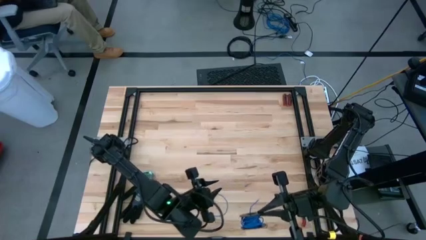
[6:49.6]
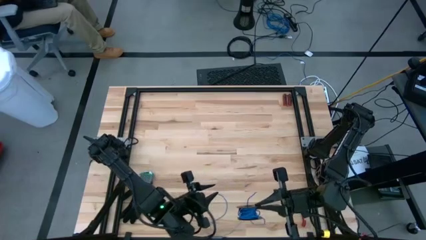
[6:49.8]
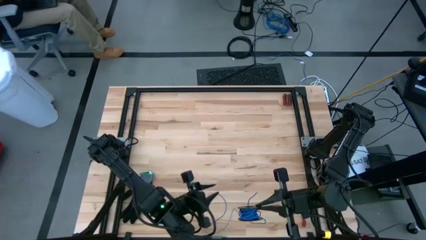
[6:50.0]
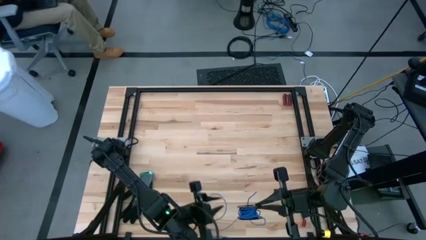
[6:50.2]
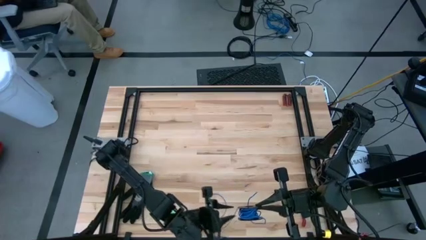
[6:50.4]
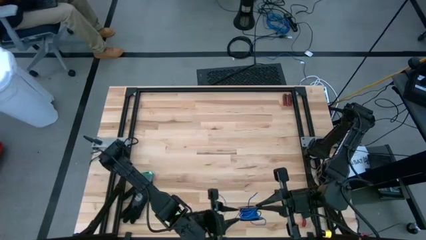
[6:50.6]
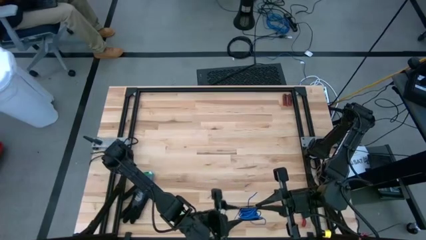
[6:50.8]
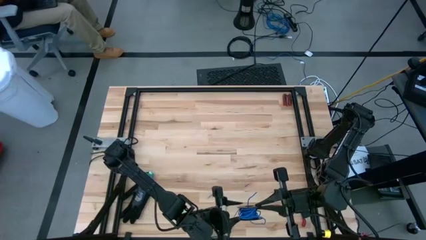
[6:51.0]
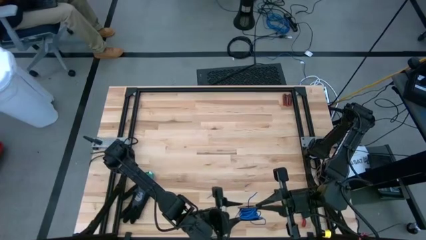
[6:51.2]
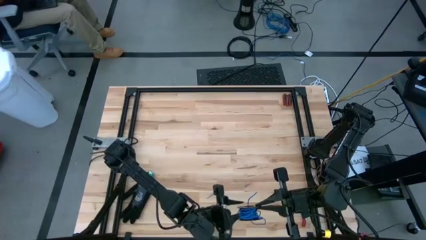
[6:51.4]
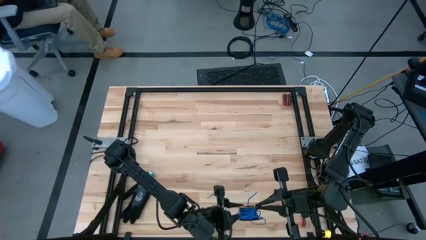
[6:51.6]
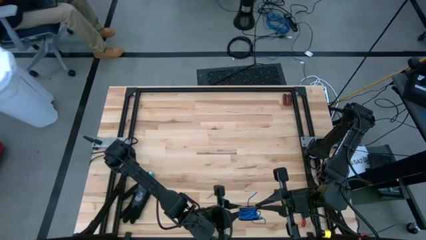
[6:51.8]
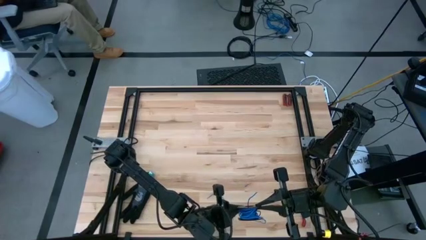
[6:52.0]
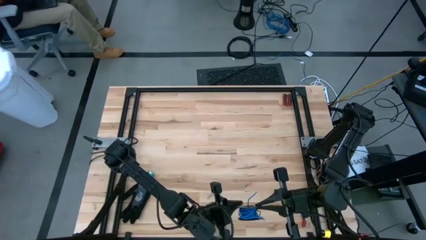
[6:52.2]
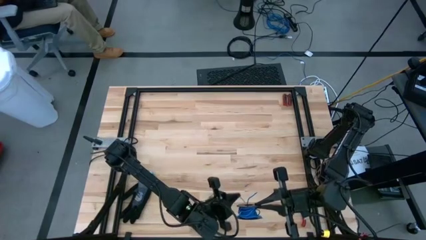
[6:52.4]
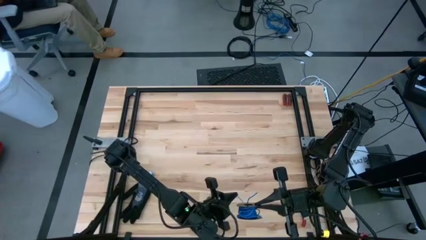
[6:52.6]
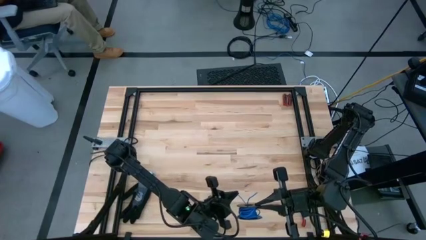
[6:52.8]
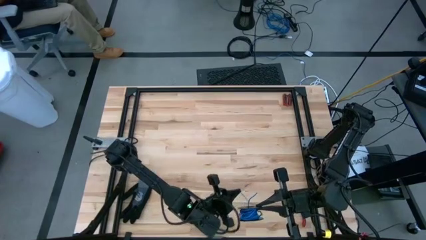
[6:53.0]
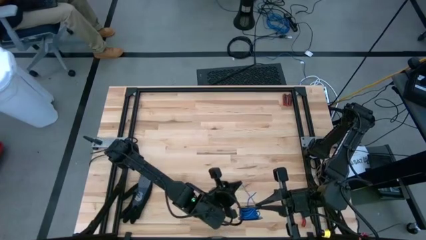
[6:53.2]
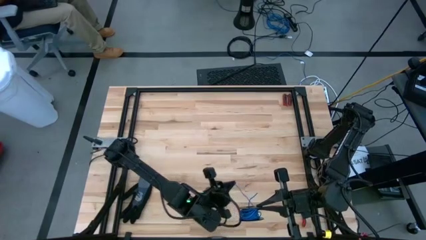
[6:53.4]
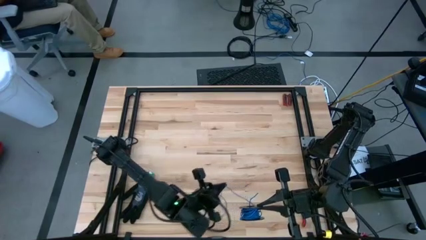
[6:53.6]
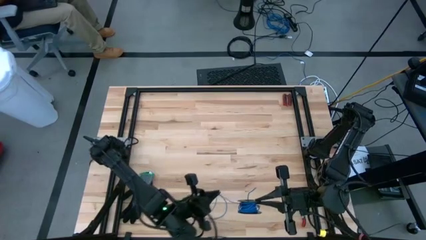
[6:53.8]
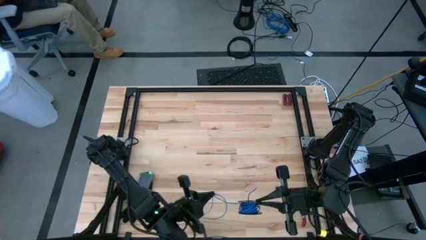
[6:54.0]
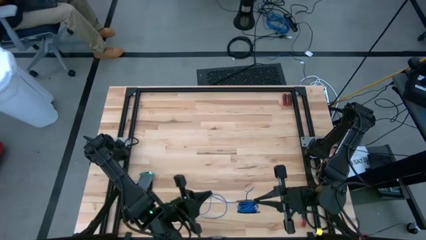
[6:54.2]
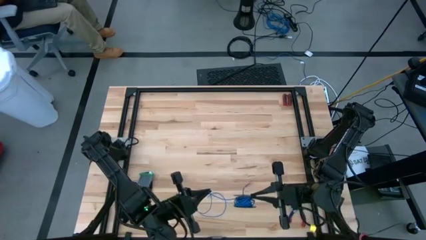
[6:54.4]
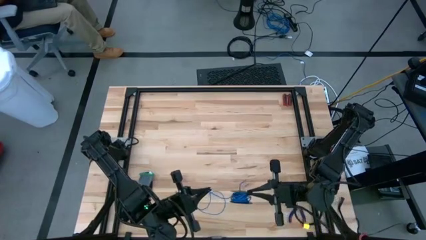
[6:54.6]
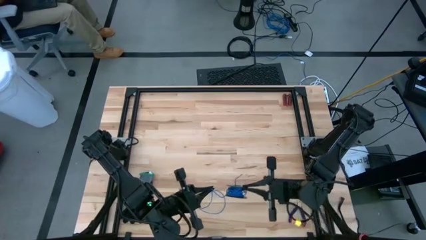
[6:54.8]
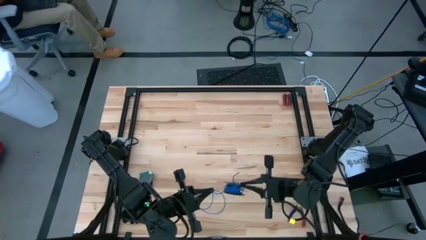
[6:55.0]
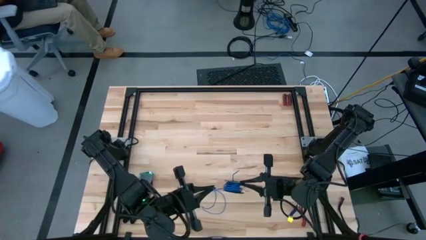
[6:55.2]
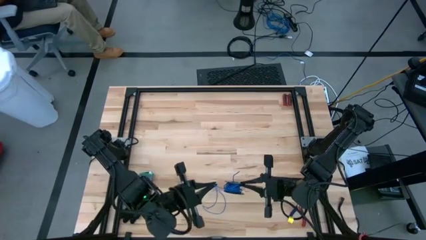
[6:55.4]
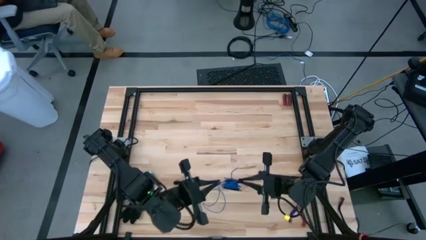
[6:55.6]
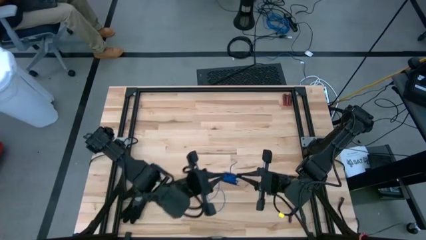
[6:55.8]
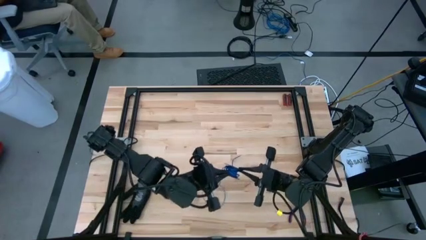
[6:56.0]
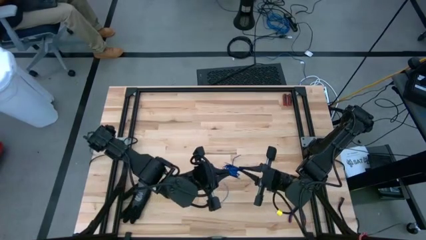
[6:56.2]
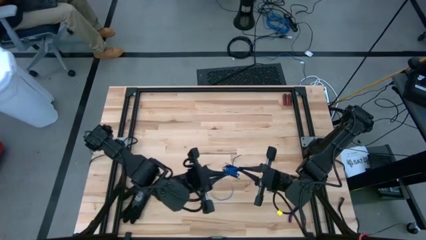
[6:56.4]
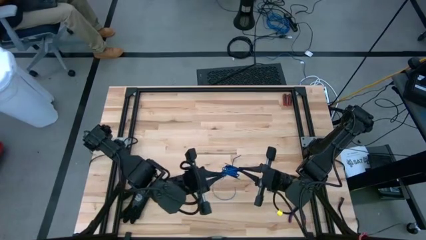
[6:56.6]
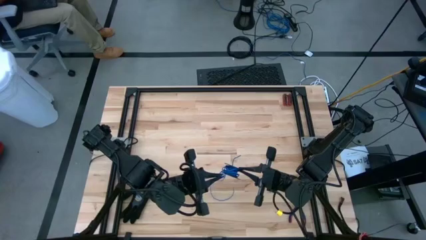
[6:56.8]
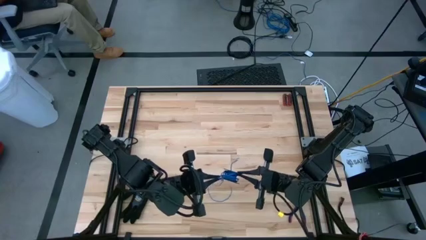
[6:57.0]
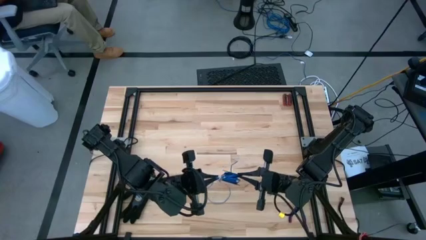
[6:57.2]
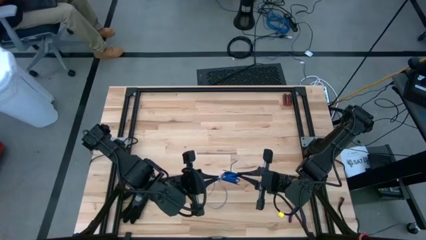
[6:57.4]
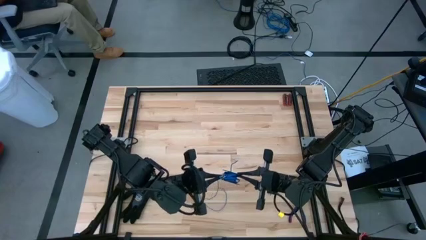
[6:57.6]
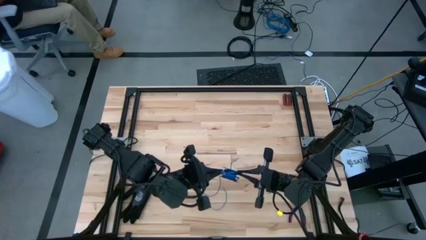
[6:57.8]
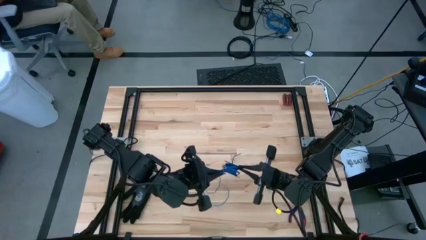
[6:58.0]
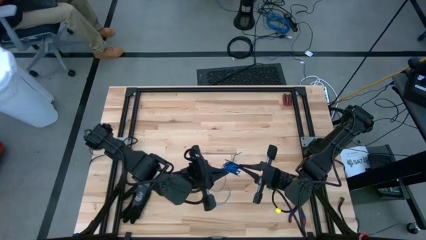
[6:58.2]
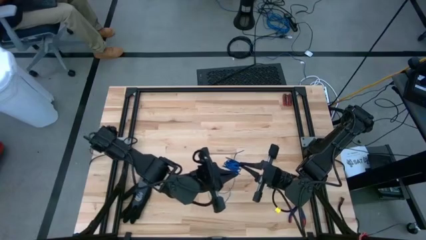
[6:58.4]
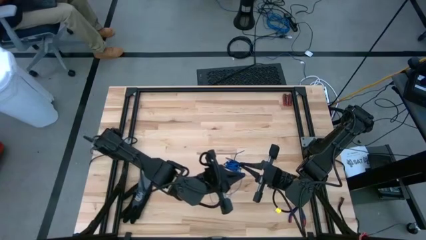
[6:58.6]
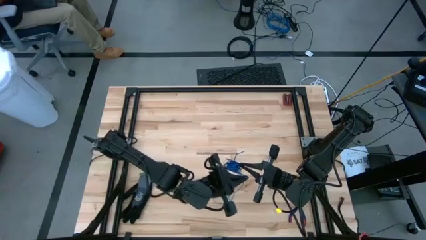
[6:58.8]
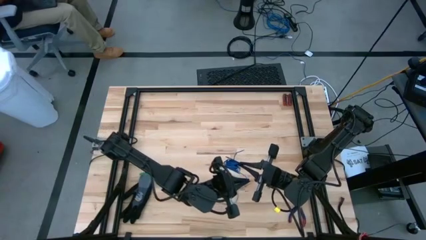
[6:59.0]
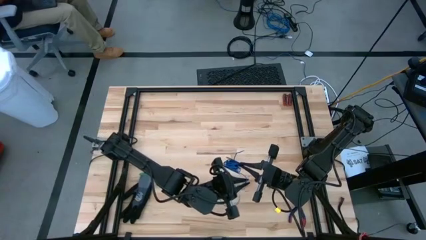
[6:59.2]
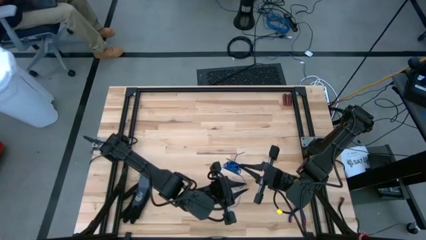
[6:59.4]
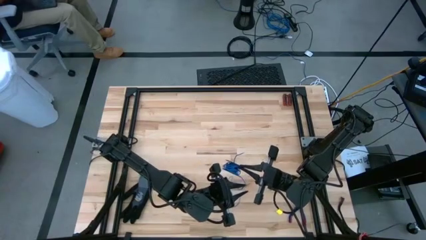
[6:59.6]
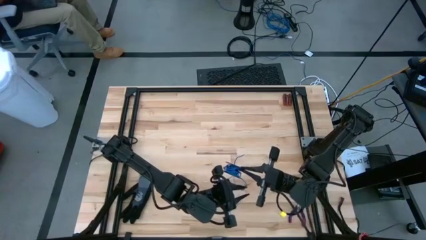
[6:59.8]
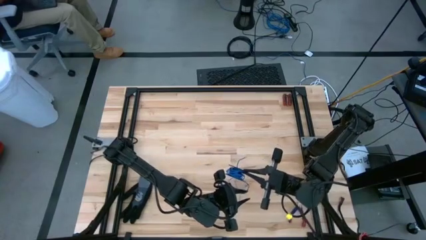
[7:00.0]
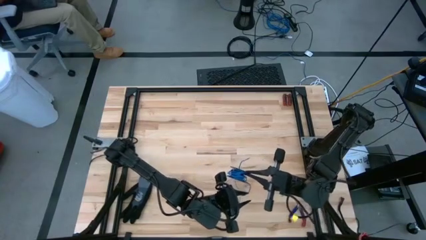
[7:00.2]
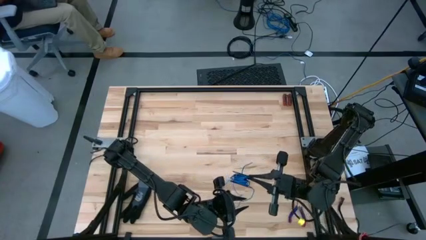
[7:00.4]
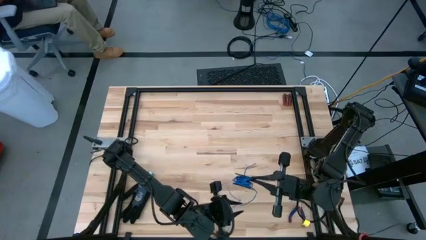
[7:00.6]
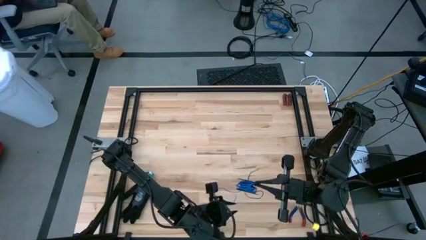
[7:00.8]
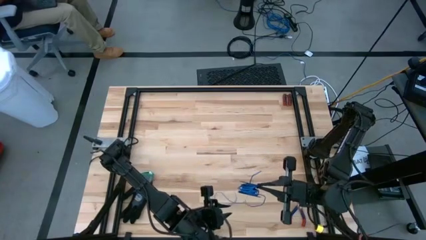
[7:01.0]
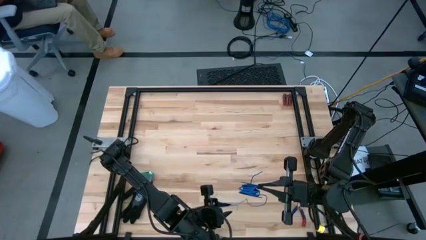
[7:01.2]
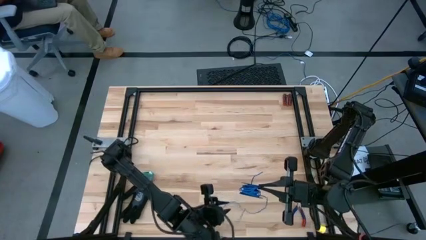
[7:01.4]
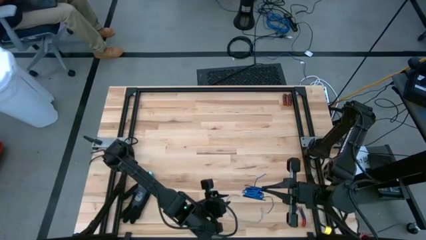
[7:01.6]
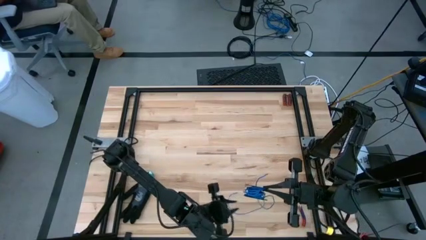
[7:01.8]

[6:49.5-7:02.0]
Task: Coil cords
Coil the blue wire onto the spool

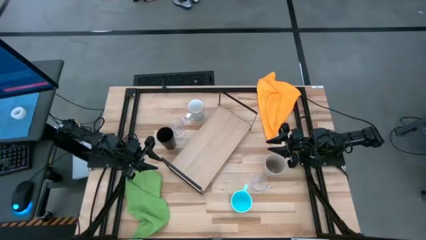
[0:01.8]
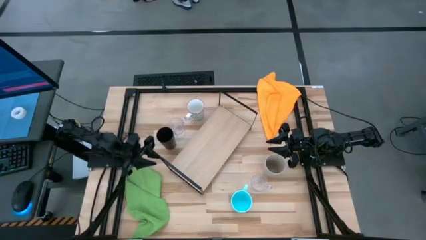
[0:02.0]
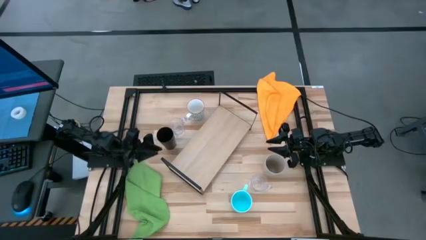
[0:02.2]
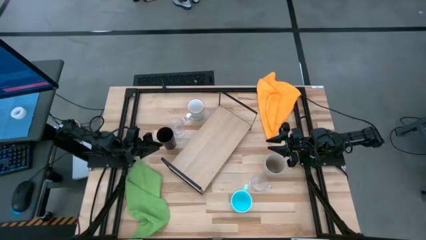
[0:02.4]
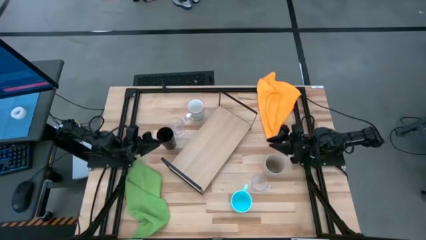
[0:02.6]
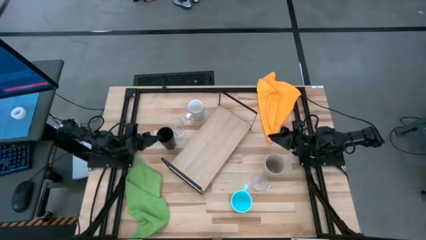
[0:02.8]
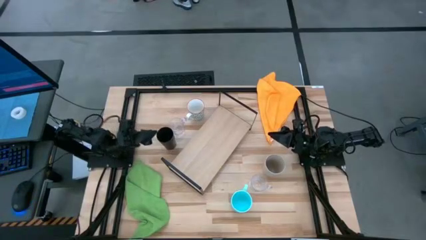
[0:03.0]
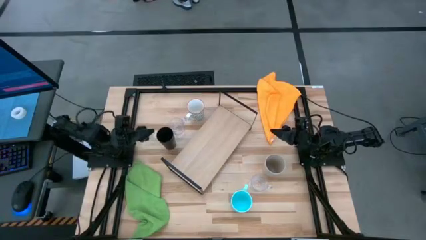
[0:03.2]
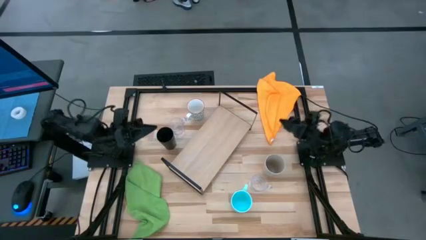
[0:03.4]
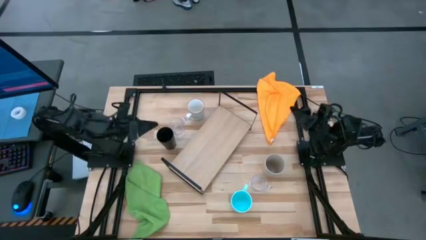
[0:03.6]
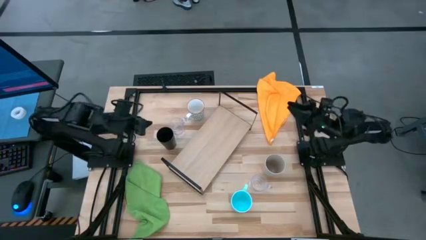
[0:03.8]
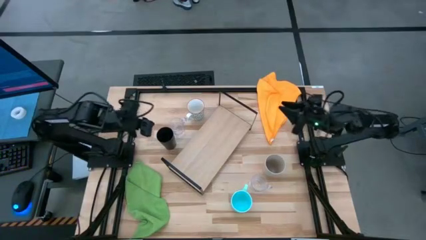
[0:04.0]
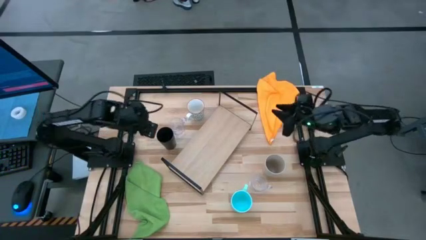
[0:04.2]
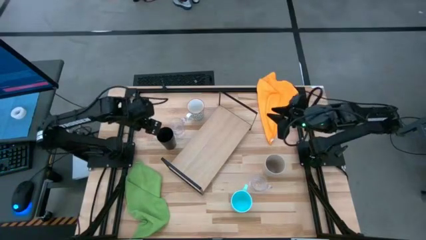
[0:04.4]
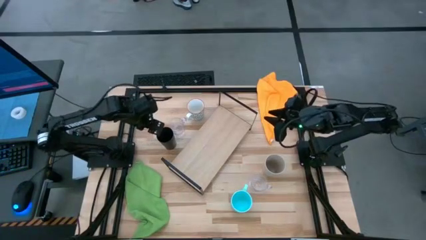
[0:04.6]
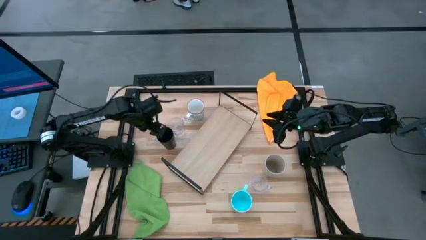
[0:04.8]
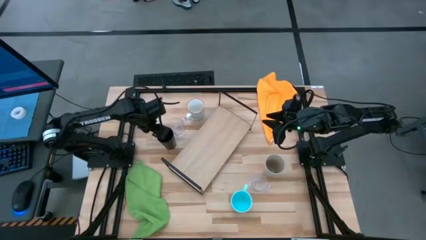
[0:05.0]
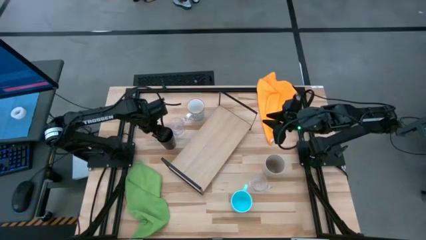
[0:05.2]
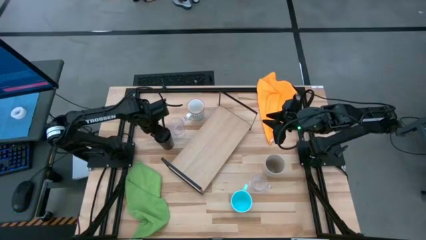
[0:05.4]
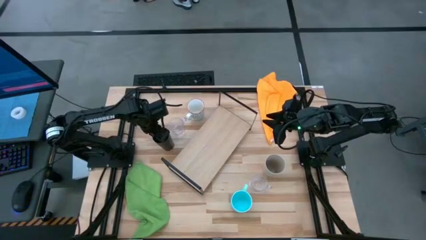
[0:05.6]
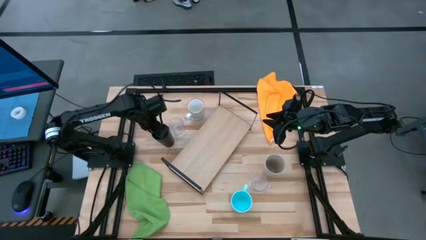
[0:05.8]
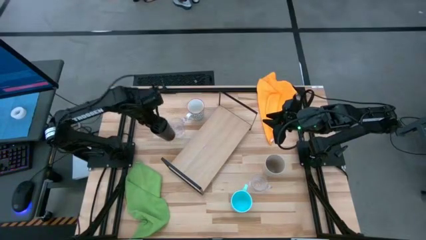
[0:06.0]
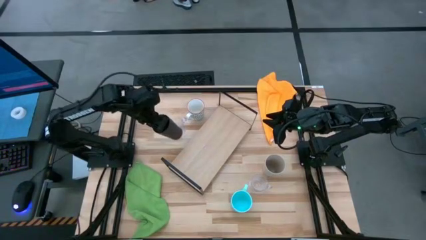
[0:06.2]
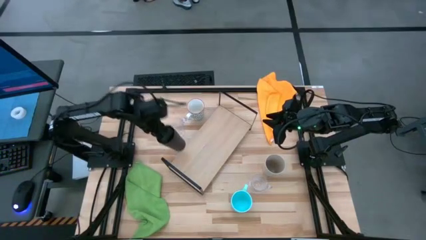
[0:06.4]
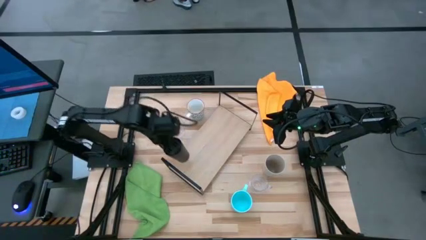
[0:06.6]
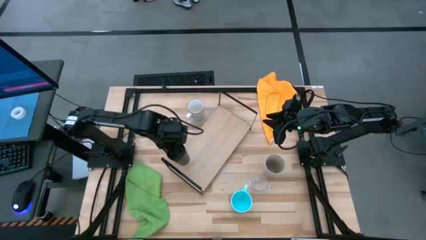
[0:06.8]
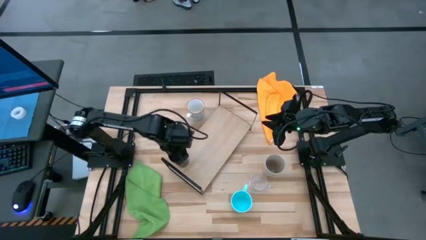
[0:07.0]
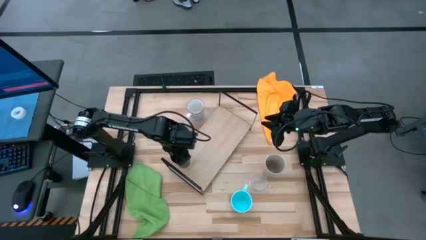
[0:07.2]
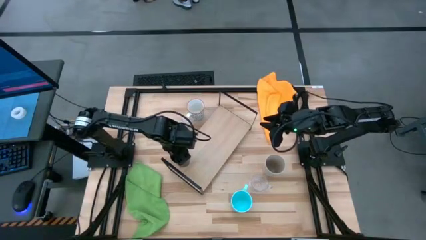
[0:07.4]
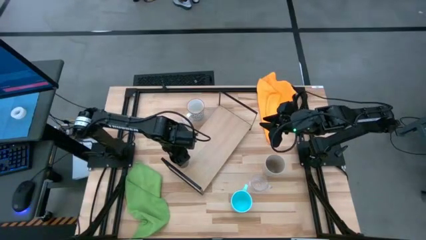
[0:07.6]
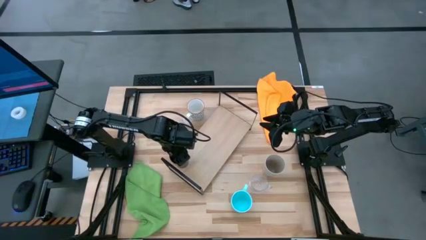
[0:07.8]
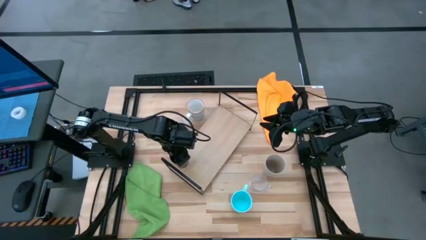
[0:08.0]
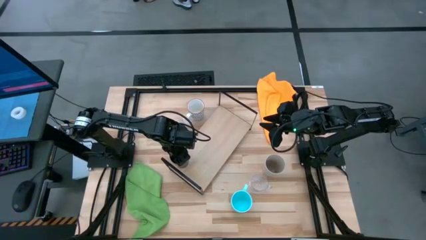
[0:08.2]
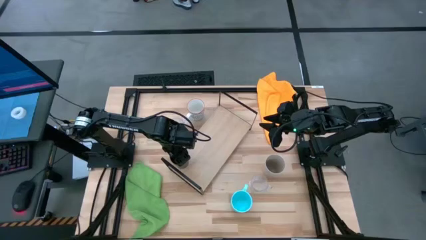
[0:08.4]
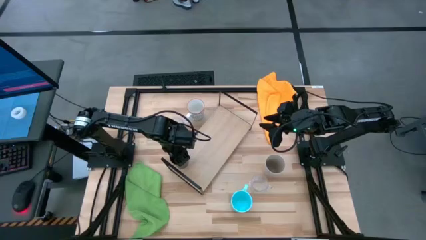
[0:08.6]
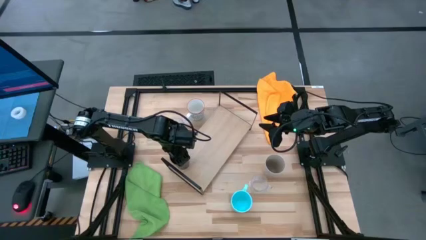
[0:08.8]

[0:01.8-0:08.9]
Task: Stack small to large cups/mugs on shelf
Put the black cup on the shelf
